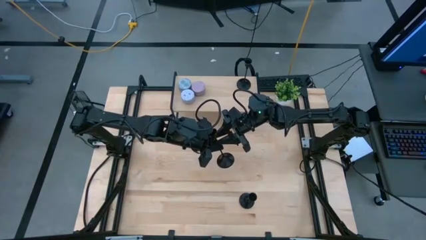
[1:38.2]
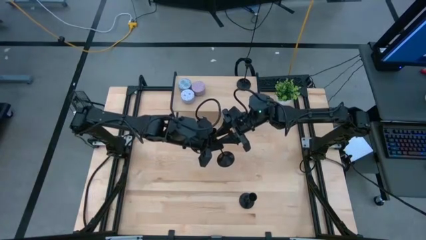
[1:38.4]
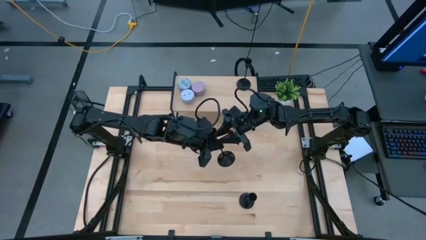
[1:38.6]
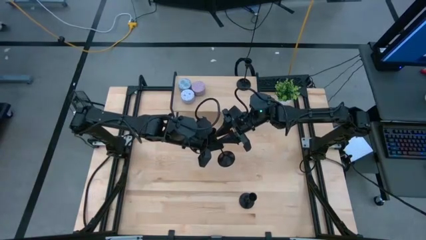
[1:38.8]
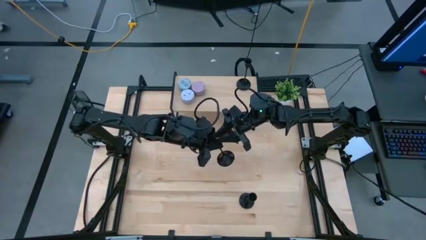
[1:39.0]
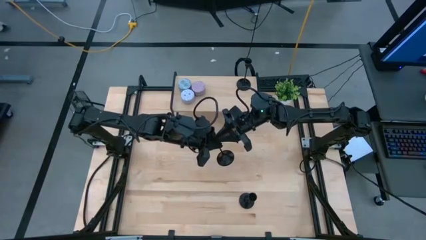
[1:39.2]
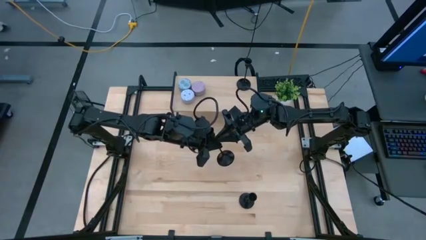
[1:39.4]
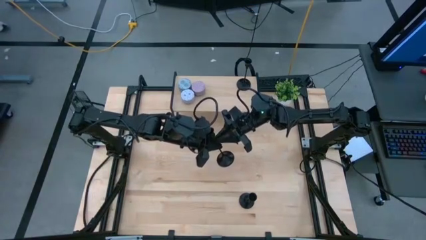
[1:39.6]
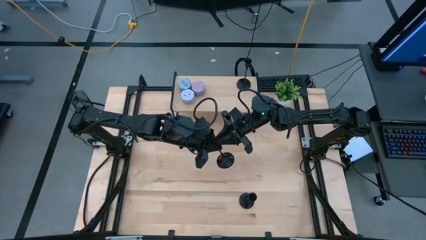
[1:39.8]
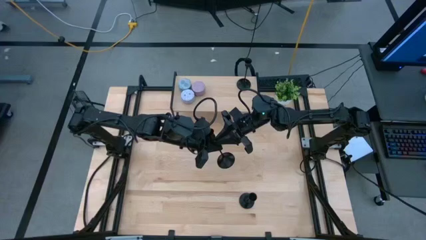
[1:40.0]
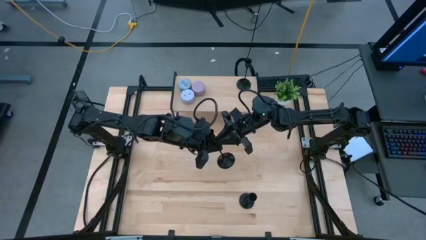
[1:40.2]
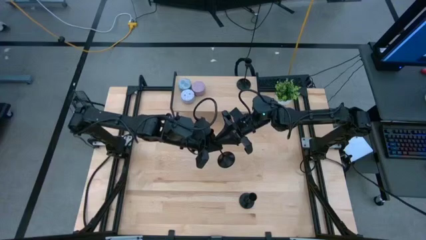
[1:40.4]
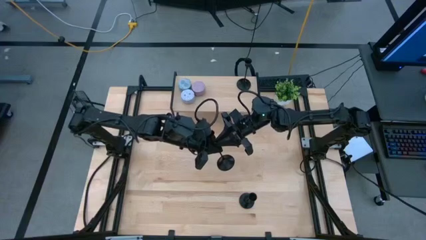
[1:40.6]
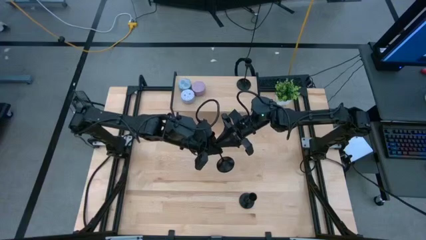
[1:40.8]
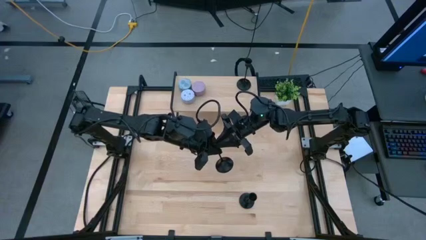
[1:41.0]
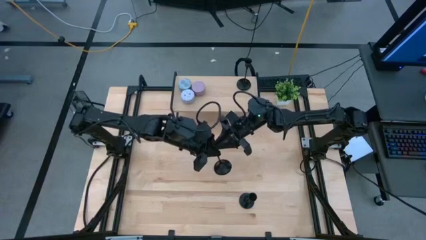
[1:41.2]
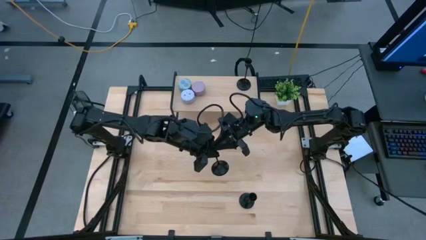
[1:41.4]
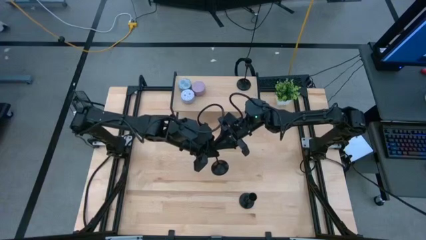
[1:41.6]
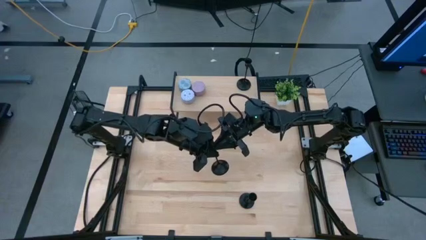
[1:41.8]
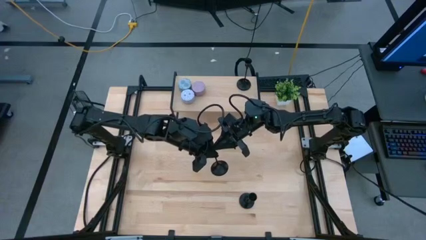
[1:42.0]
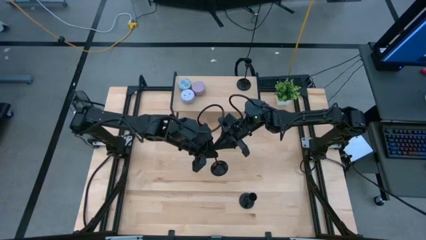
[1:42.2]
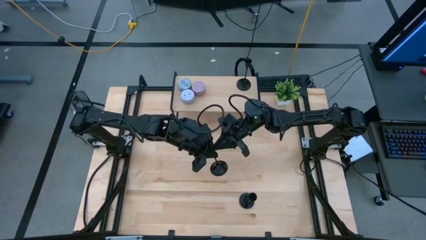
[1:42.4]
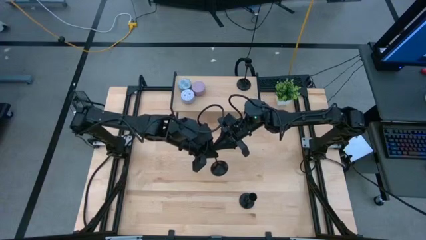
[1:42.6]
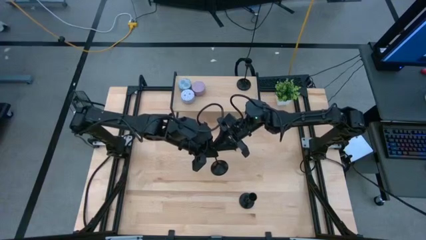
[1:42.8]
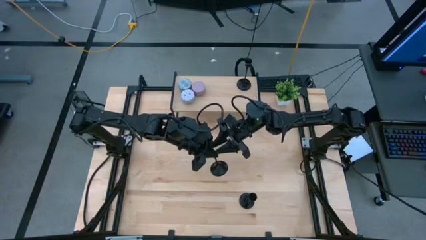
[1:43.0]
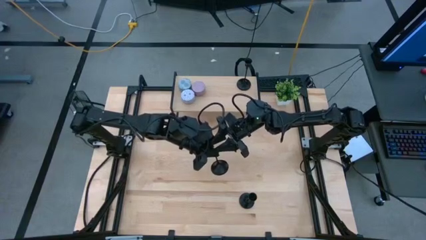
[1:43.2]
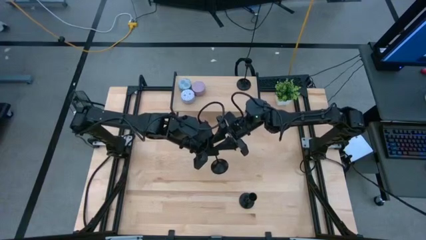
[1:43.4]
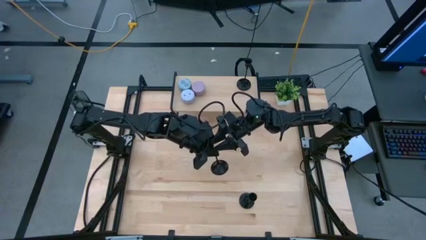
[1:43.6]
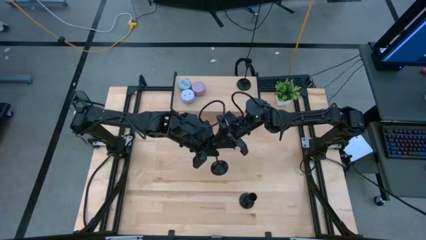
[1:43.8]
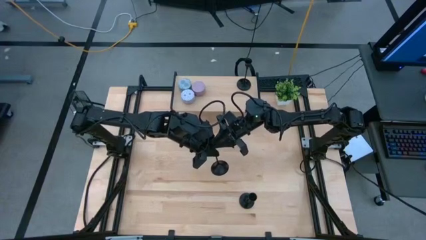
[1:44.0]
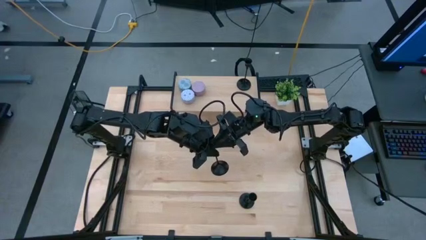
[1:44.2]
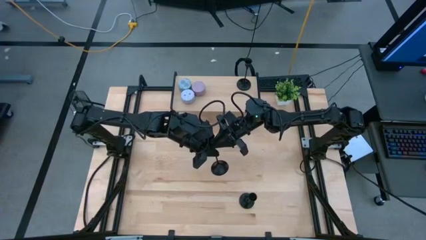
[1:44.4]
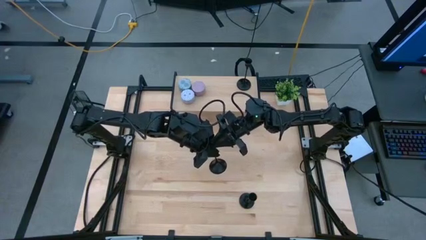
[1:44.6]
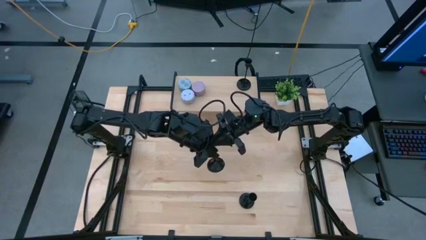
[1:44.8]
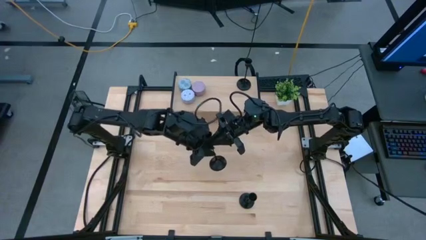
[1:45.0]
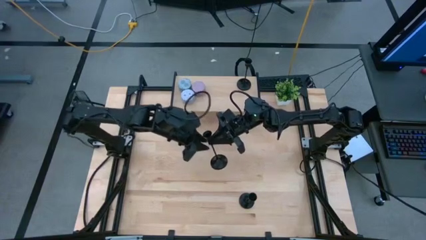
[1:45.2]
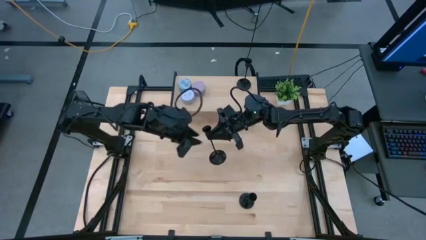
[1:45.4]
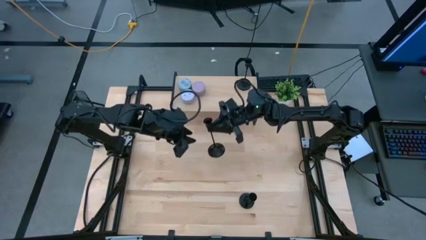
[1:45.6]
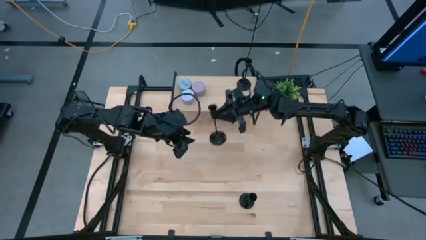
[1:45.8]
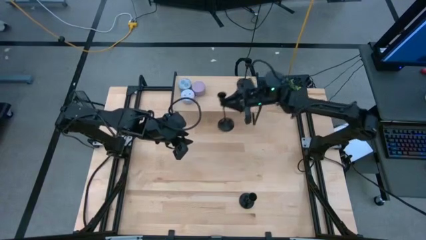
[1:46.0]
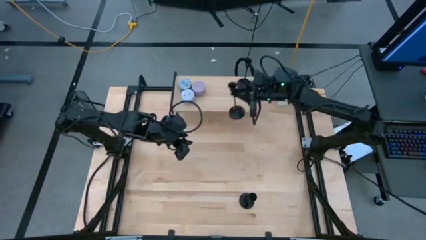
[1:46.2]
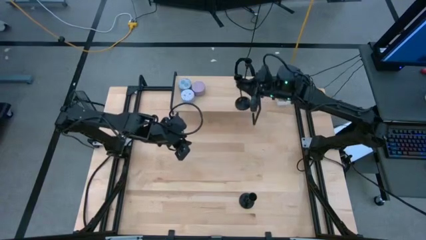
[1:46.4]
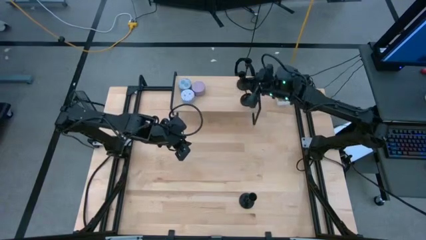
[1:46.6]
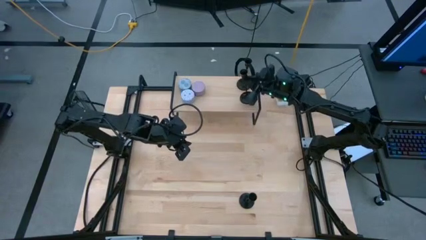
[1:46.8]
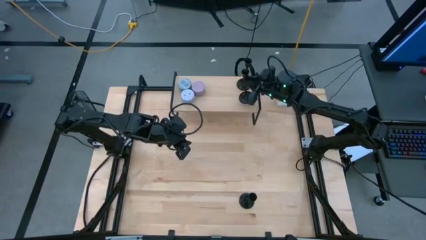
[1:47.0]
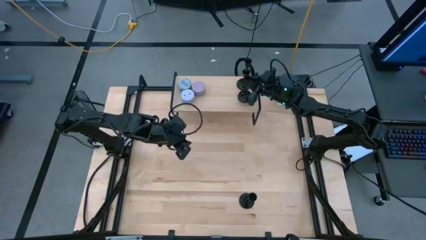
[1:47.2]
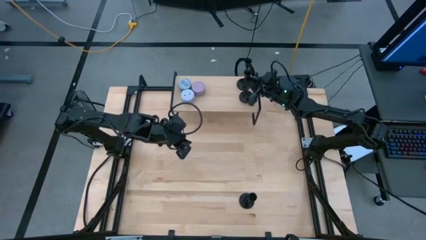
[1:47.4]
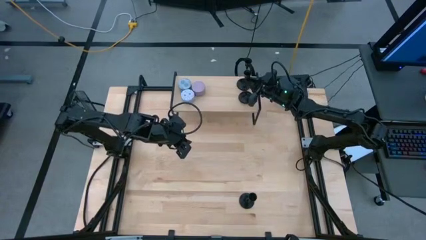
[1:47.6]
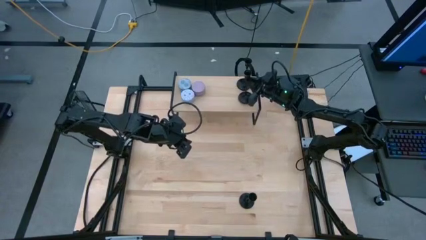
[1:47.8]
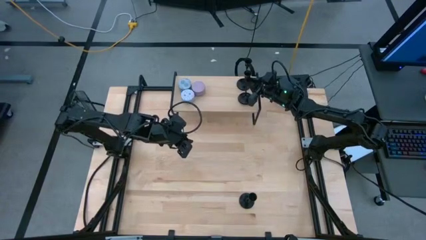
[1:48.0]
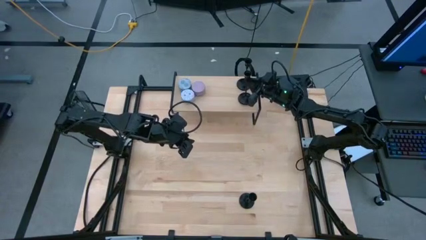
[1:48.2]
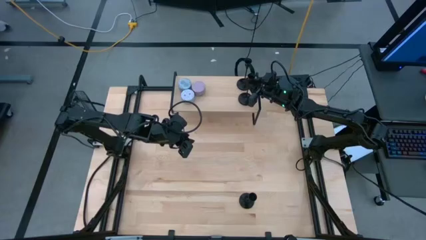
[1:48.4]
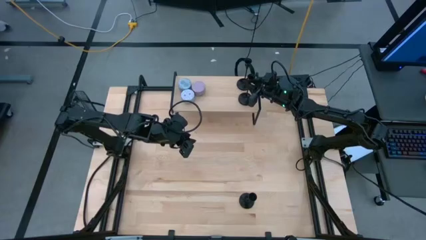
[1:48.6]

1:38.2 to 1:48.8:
Task: Pick & Place candle stick holders
Put the left black candle holder on the shelf

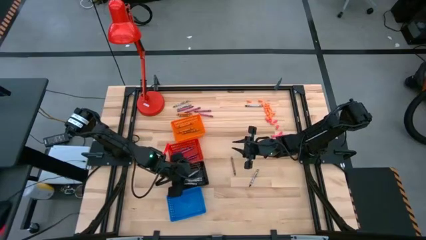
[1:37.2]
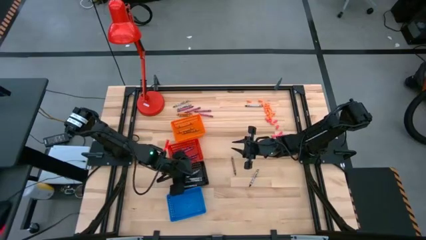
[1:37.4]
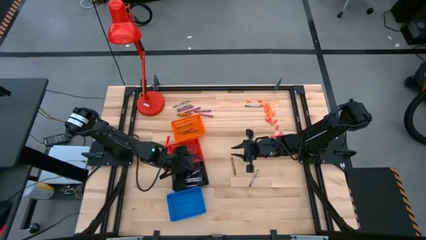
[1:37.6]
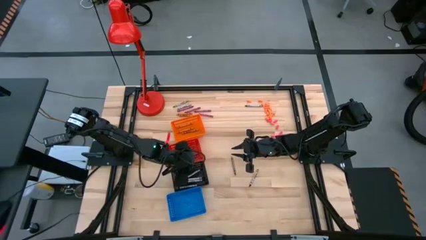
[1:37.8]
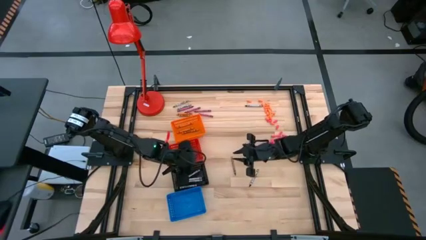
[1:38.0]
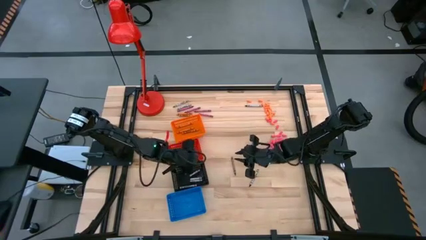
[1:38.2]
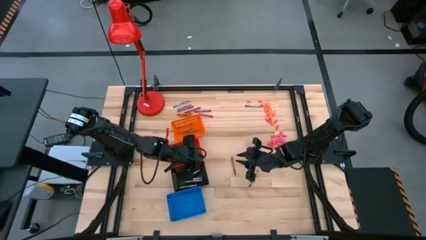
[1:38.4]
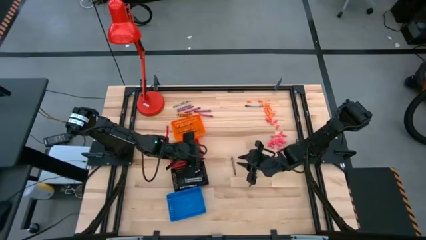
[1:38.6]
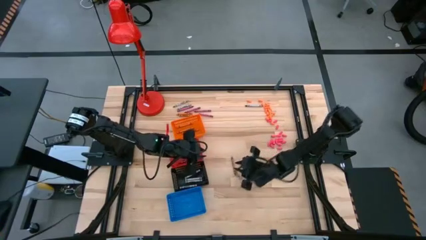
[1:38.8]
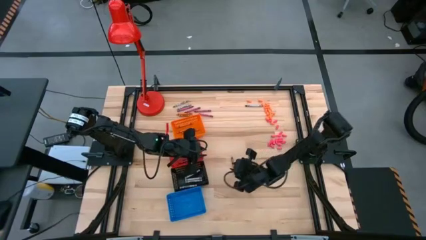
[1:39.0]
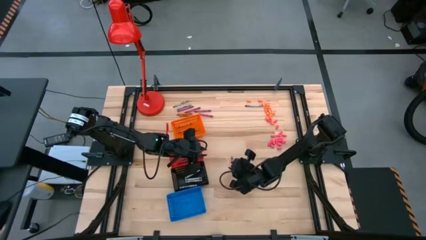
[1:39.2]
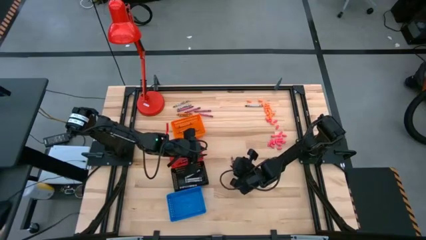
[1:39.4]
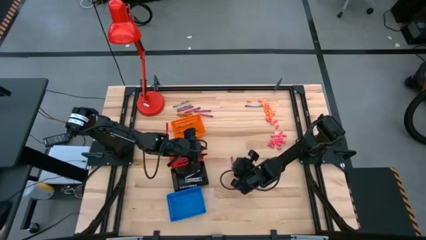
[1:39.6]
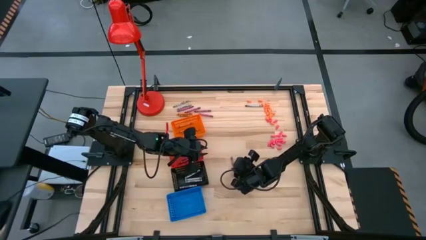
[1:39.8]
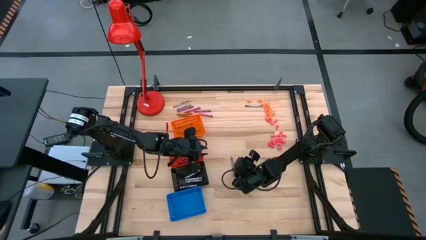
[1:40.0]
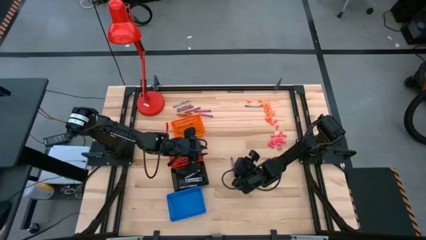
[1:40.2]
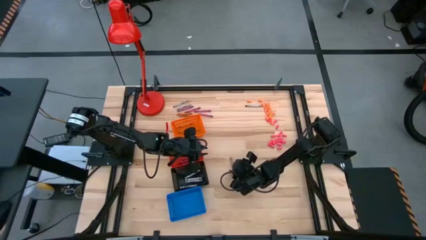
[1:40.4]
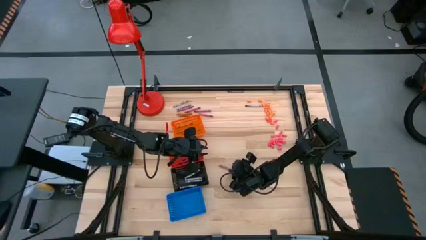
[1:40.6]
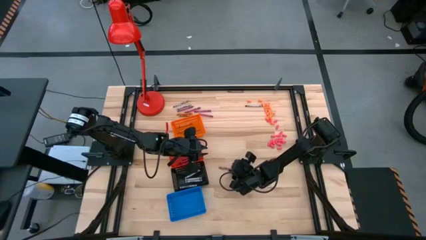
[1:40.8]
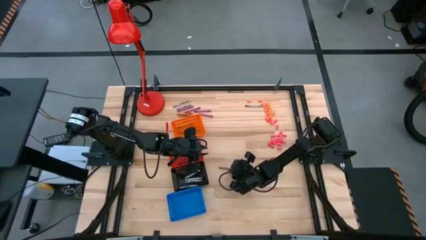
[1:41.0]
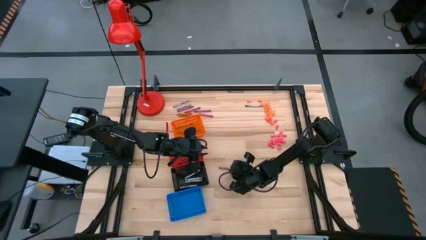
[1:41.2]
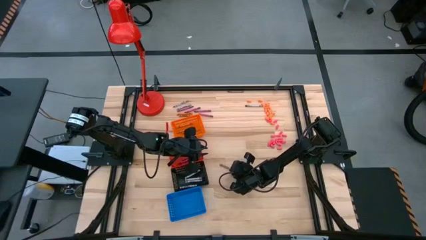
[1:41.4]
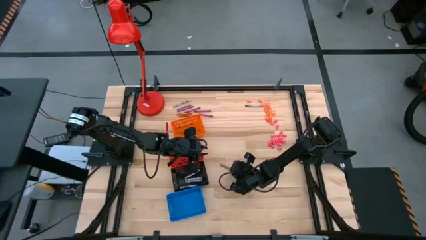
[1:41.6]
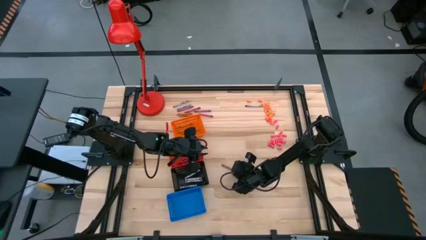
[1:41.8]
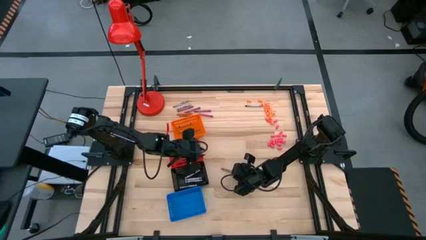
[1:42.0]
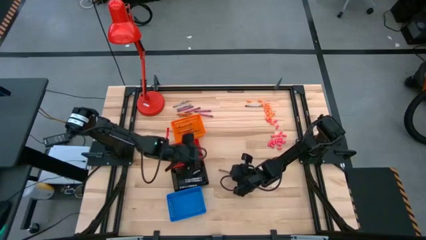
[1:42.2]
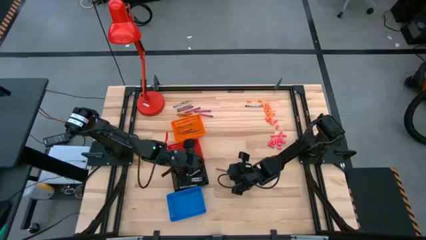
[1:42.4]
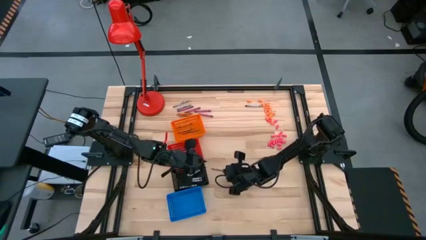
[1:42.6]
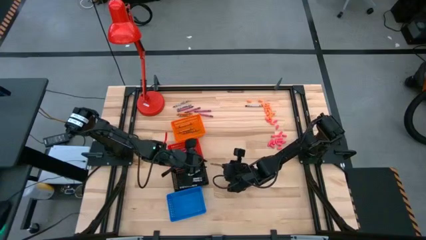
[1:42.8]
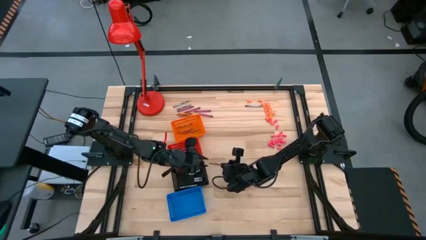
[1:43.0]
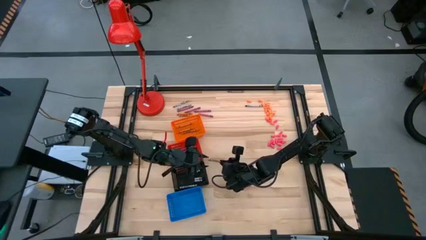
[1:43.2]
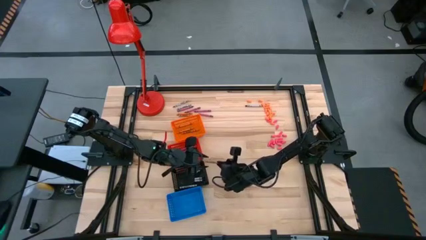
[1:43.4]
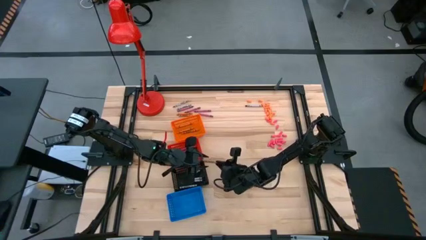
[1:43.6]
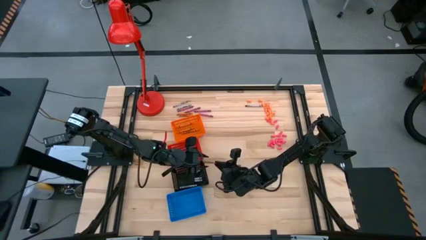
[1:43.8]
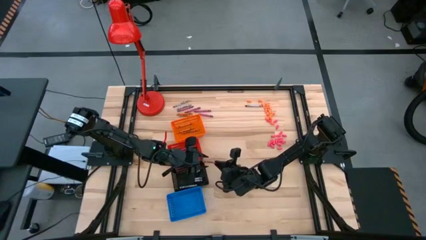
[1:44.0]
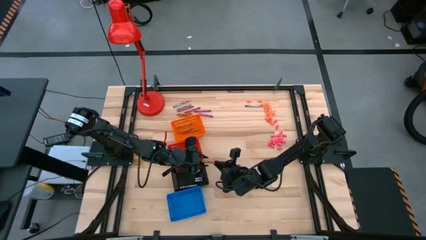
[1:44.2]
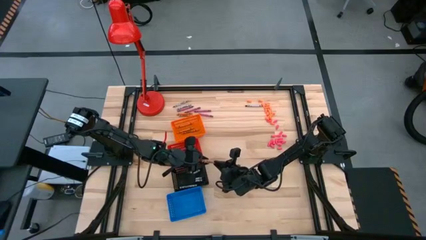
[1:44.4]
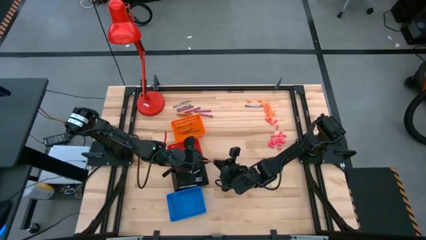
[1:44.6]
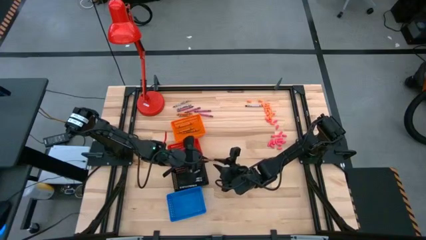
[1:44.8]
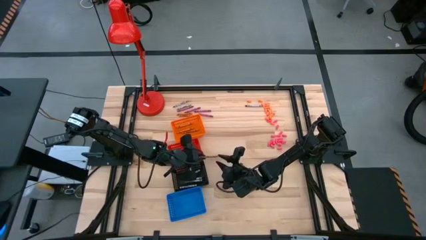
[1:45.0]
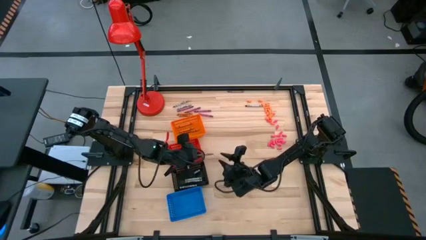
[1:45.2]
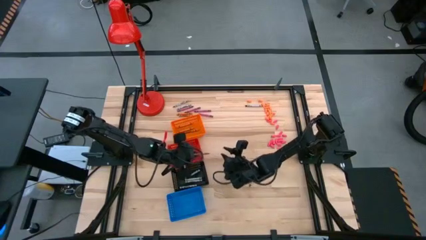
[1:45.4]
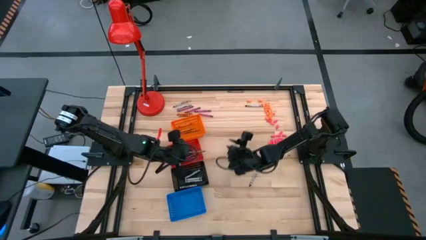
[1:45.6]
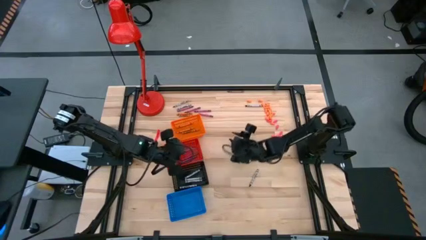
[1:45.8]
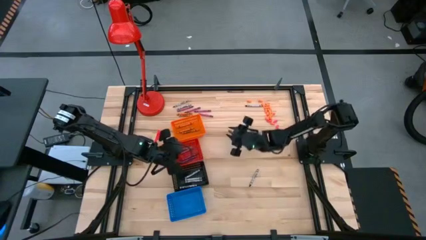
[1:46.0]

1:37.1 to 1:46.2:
Task: Sort crayons
Put the brown crayon into the blue basket
